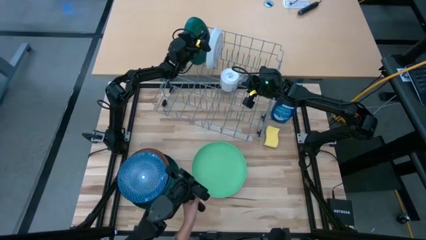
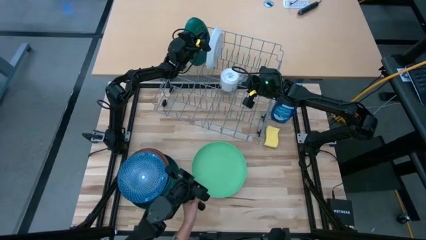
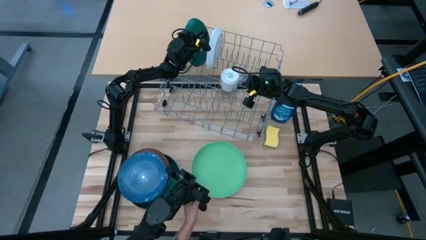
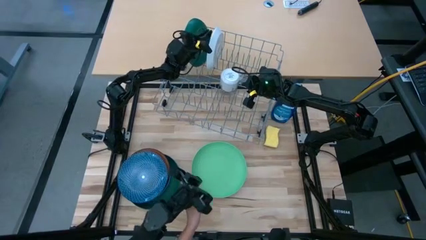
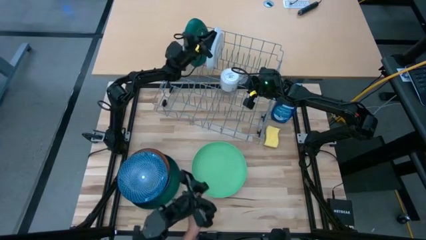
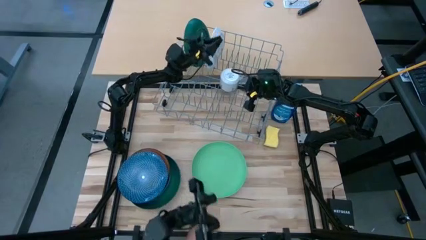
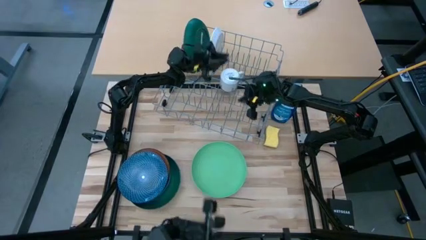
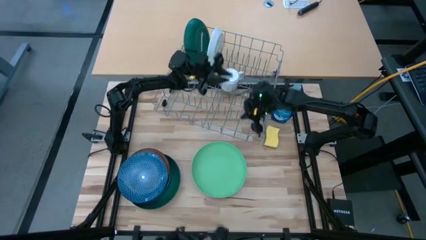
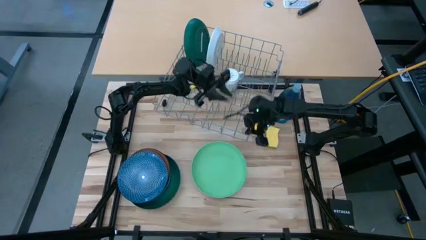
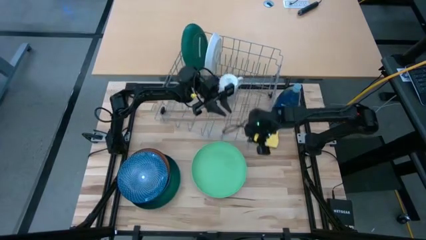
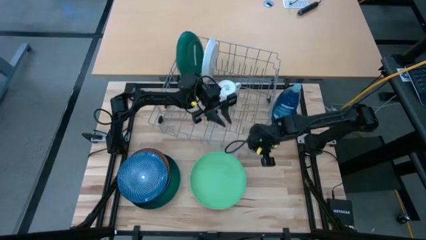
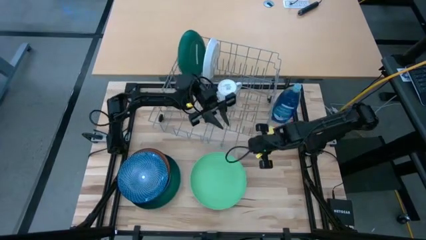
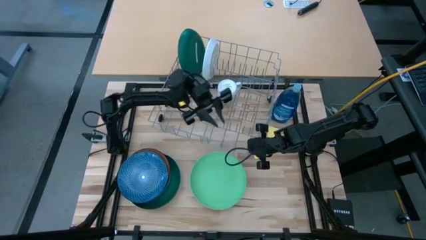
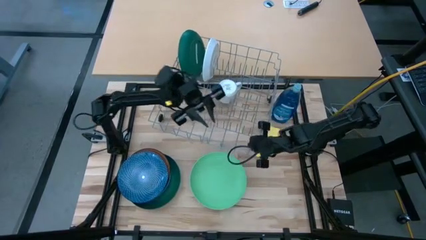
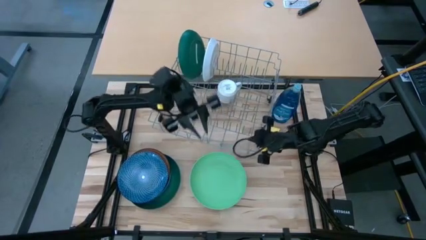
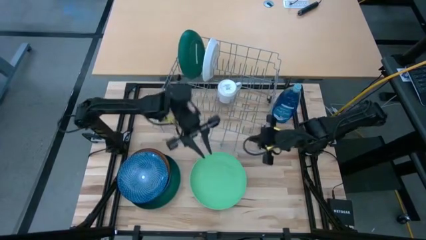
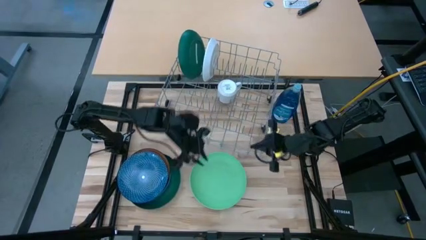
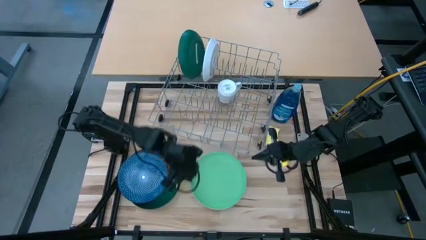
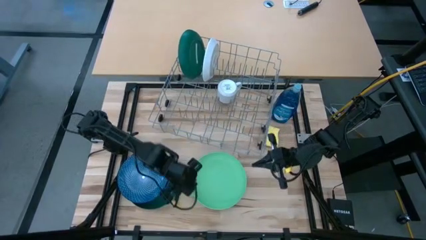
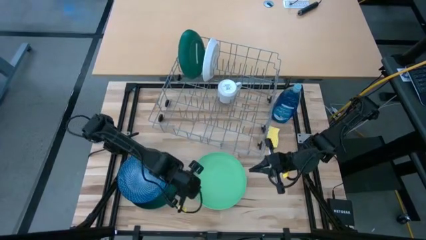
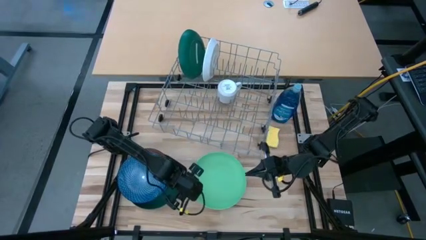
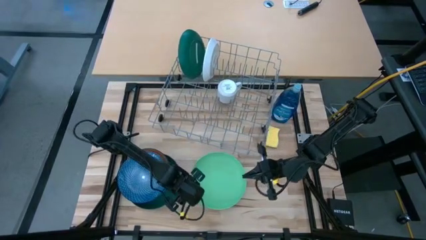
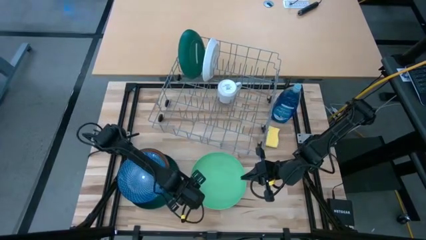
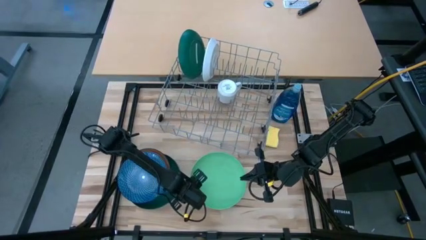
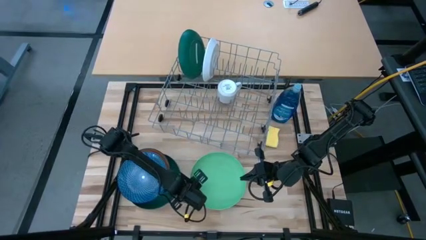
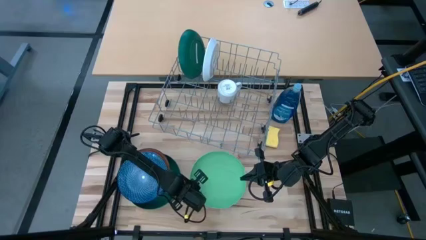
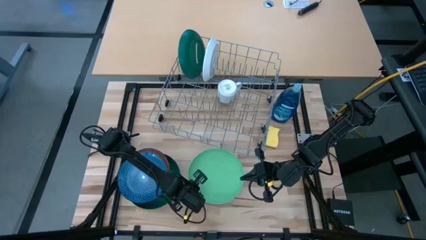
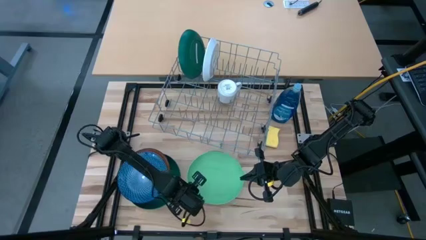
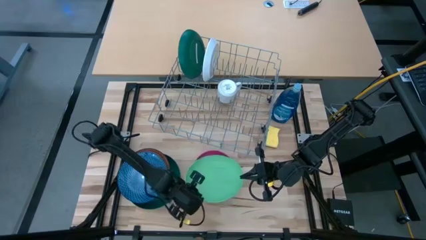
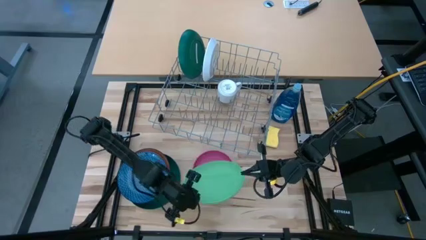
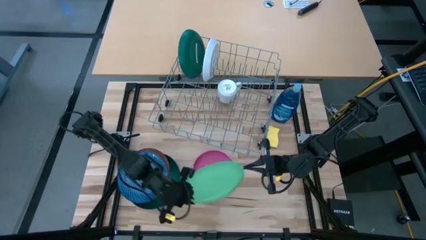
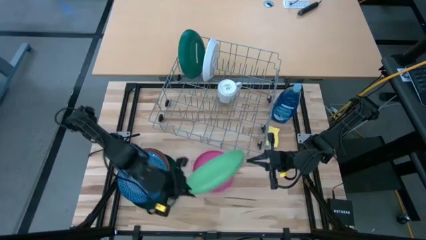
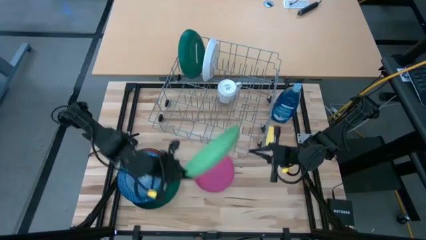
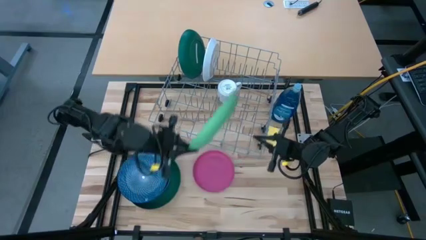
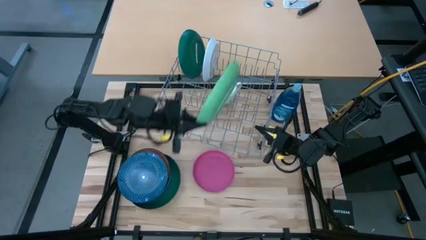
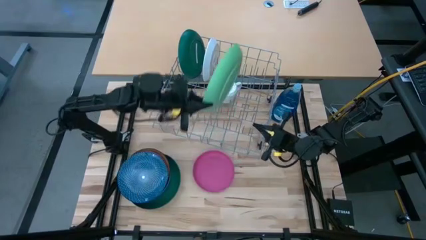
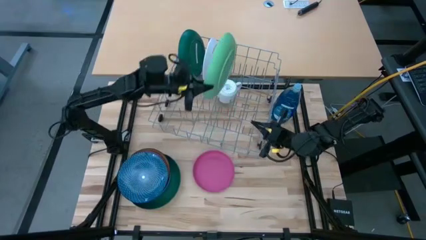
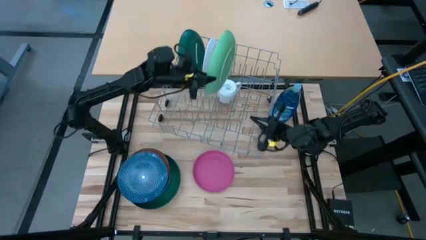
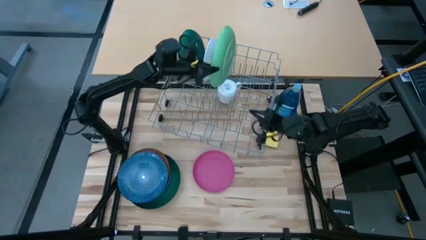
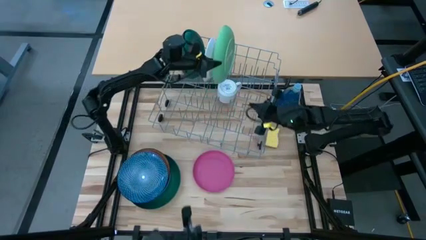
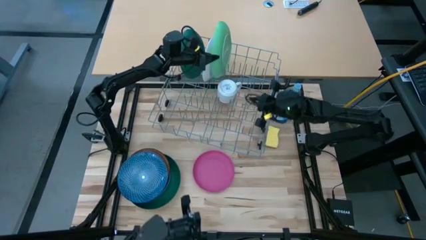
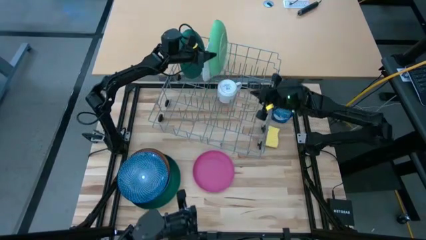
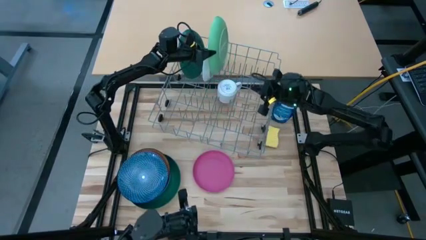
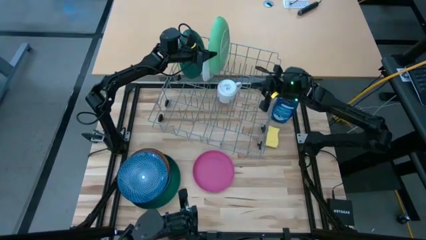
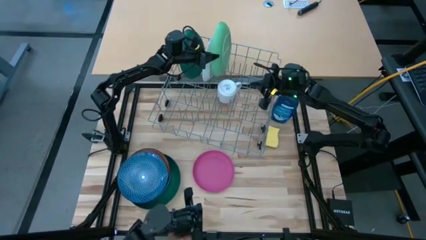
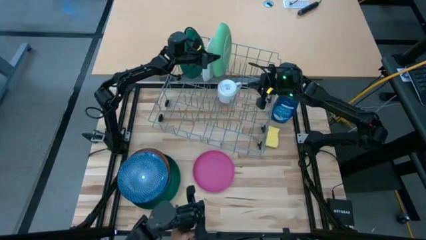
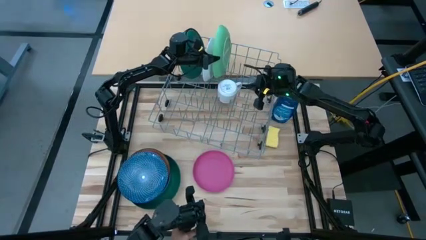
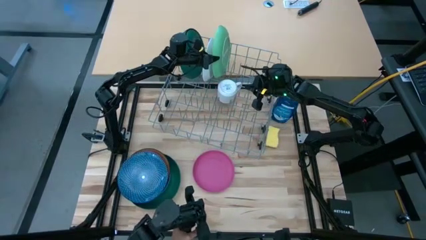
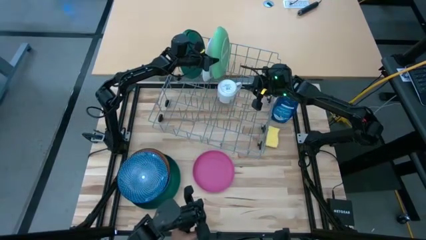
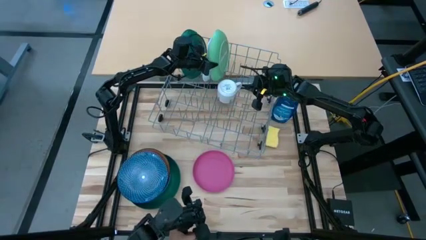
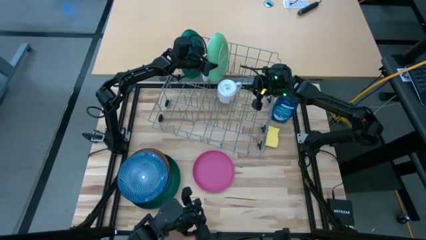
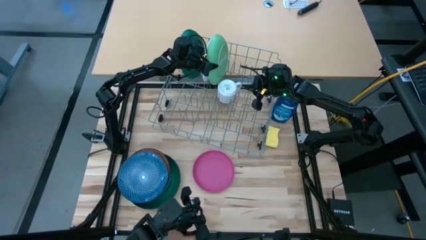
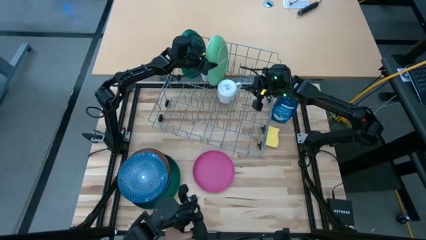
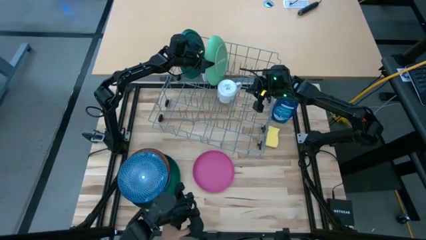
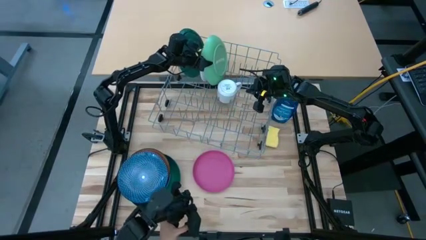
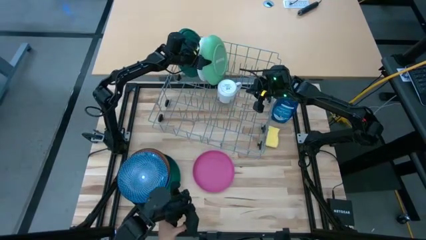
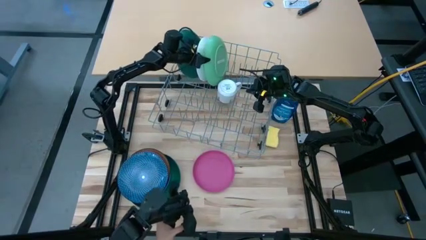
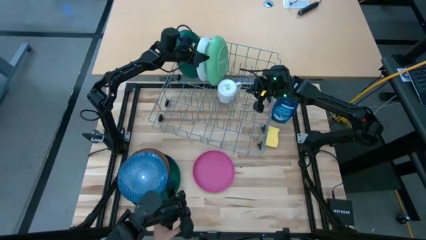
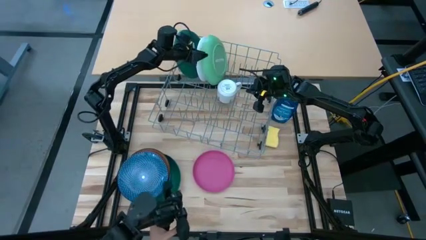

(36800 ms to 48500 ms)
Task: Sort dishes
Put the light green plate in the dish rack
